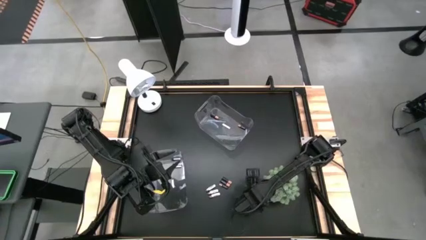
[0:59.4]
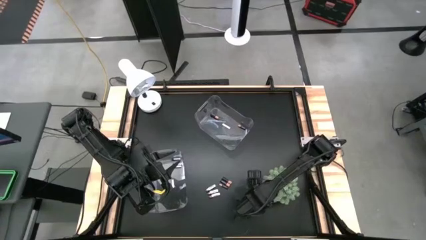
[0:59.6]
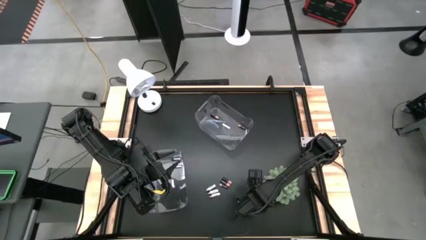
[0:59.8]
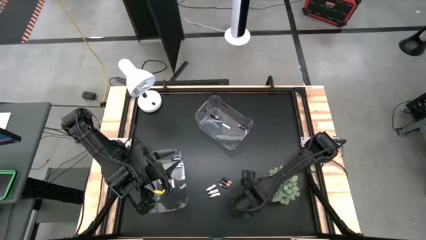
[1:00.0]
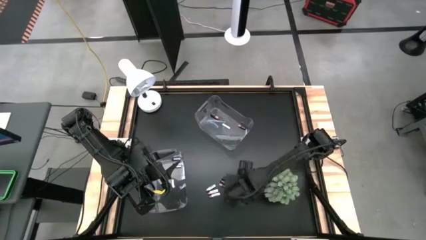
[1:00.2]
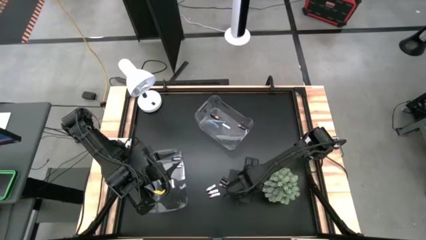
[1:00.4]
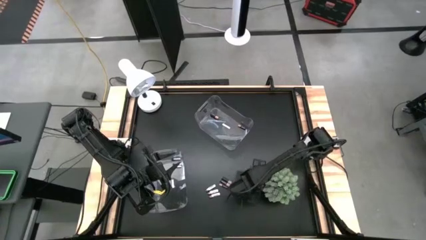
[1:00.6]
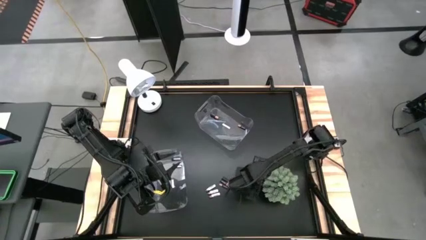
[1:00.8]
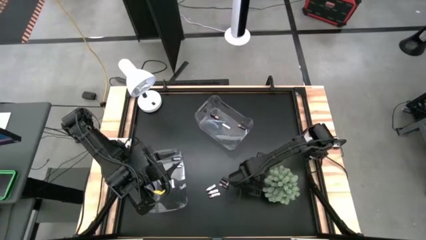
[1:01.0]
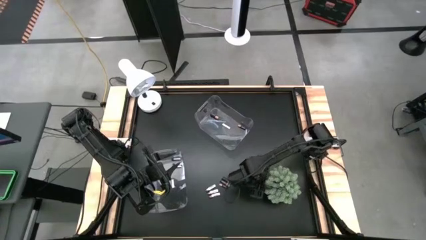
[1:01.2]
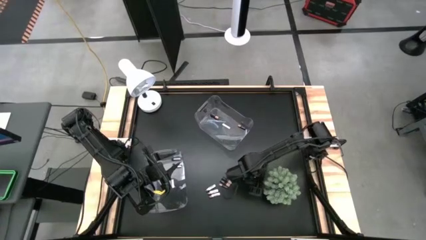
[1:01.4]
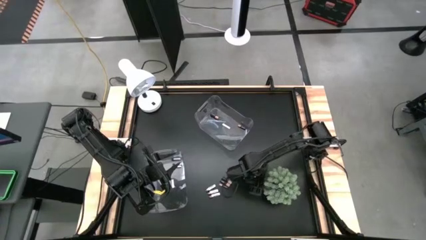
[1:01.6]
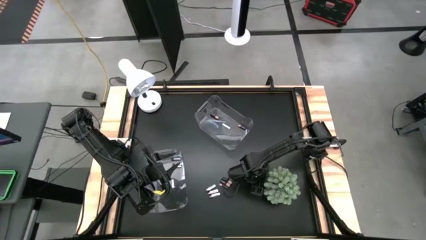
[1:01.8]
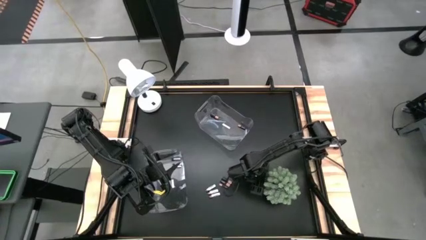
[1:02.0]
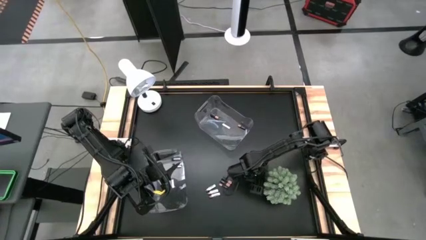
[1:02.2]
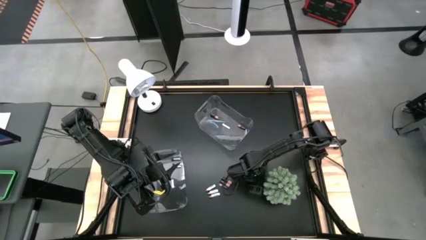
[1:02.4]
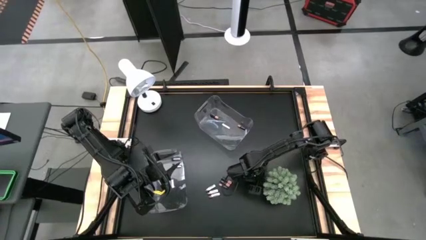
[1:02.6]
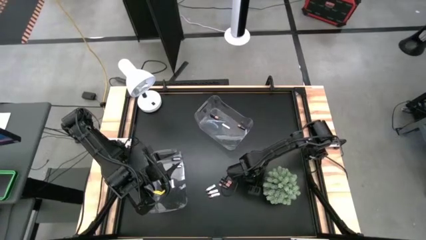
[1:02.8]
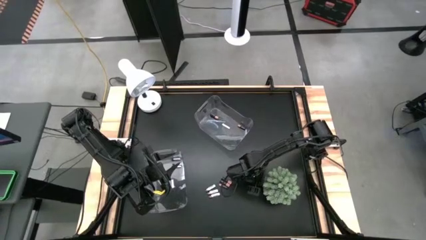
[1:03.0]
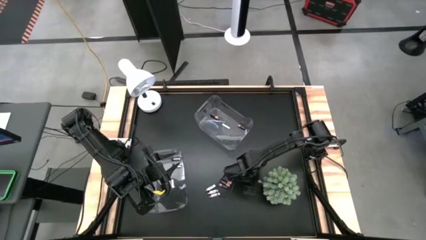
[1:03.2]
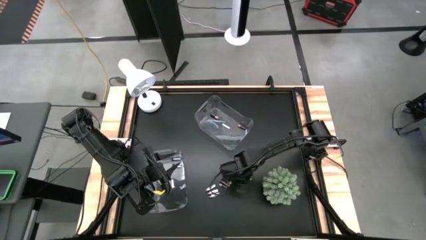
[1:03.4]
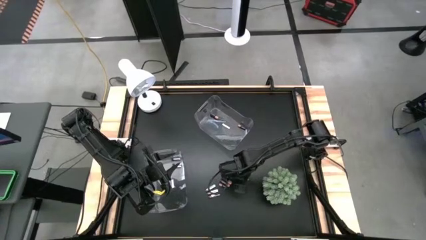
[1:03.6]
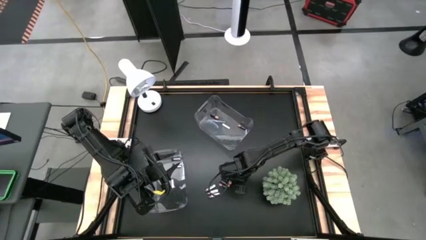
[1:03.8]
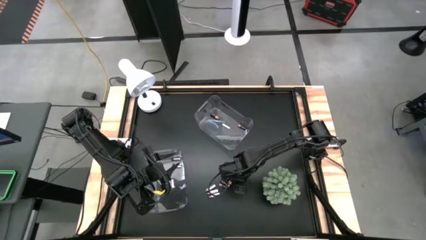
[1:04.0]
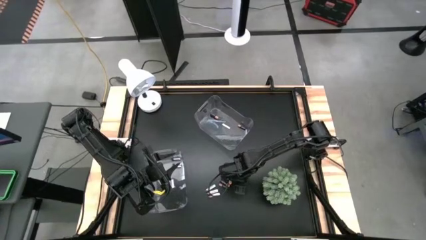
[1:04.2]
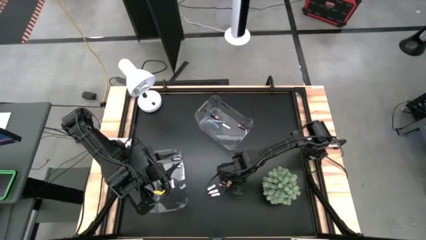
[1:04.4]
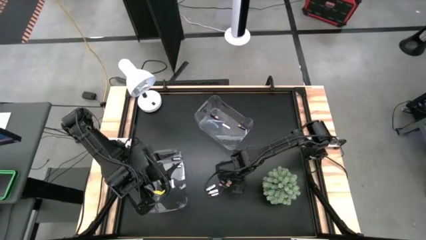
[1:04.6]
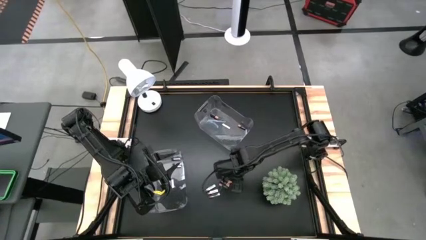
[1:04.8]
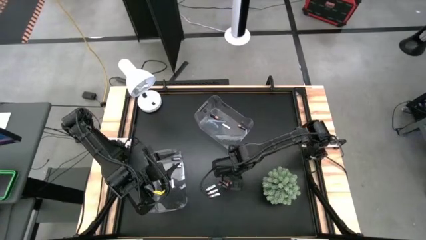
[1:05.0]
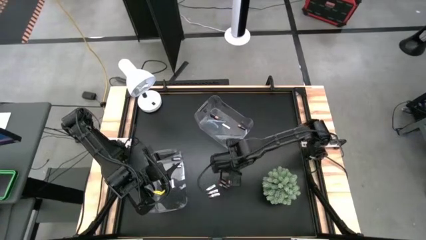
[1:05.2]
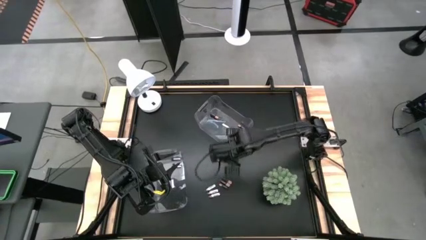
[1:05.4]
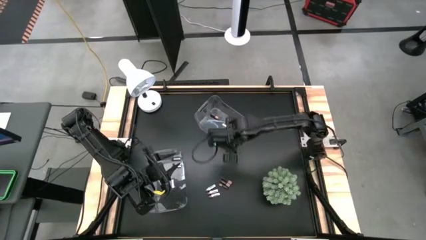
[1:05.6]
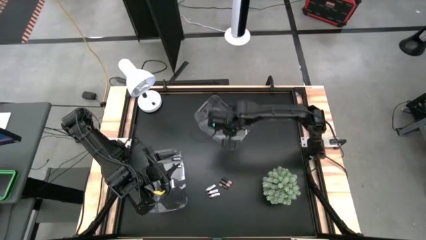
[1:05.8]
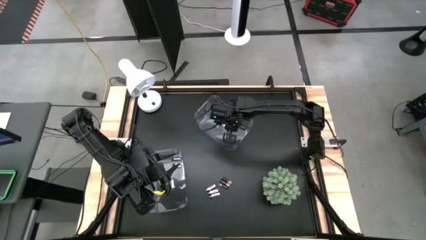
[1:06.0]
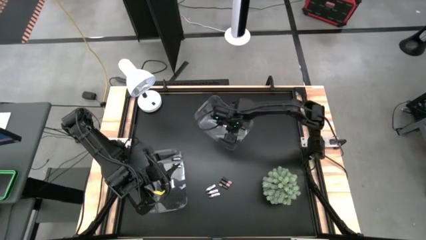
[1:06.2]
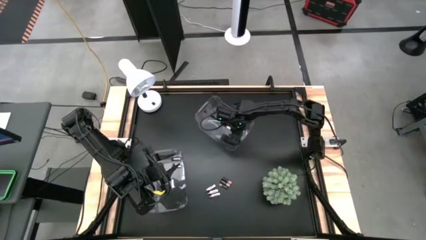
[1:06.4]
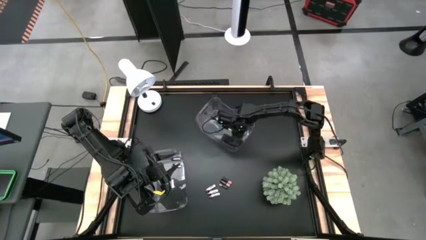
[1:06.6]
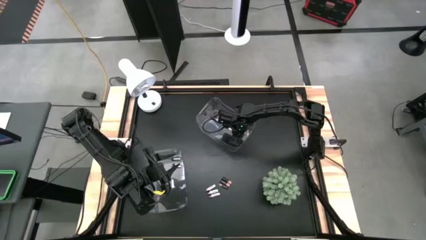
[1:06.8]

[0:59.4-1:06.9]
Task: Sort batteries
Put the black battery into the top transparent bin

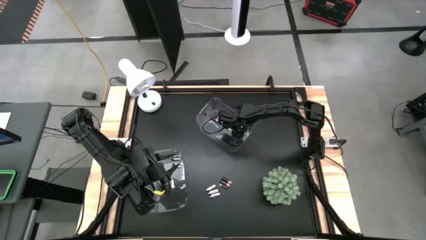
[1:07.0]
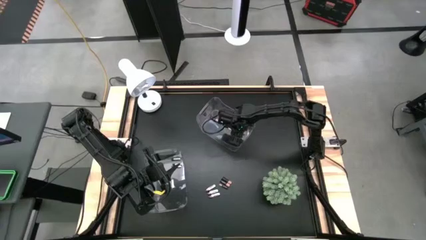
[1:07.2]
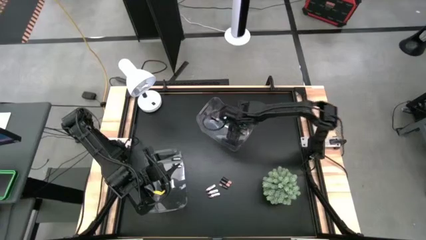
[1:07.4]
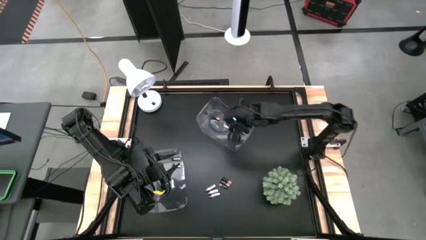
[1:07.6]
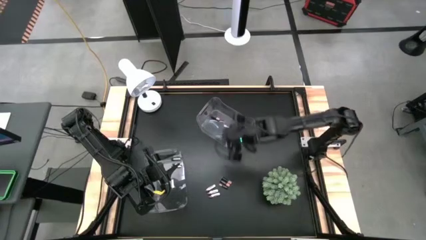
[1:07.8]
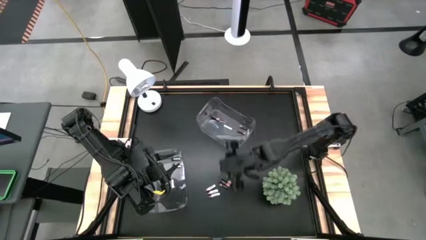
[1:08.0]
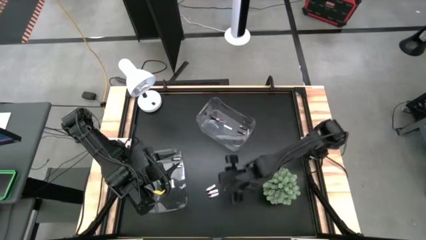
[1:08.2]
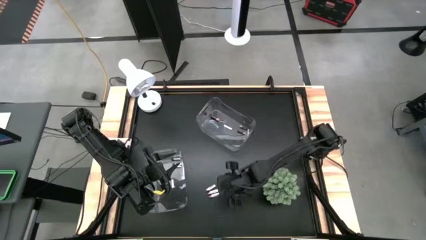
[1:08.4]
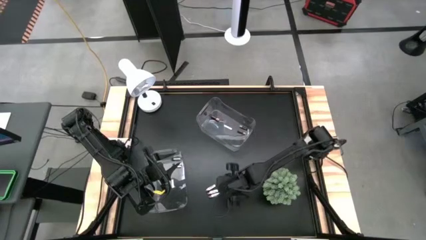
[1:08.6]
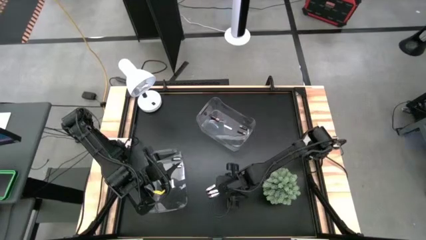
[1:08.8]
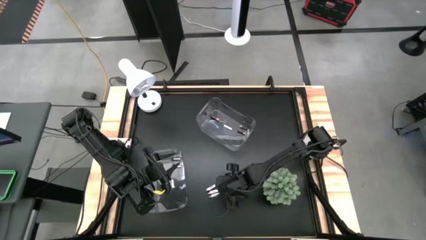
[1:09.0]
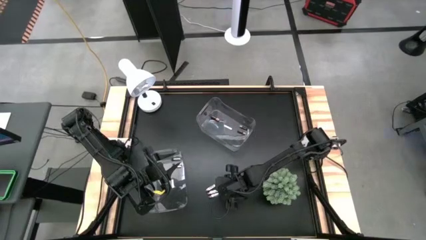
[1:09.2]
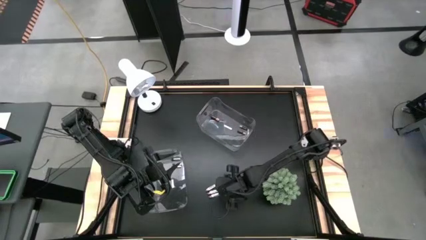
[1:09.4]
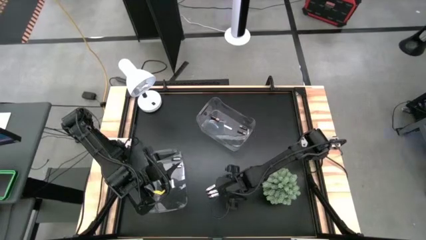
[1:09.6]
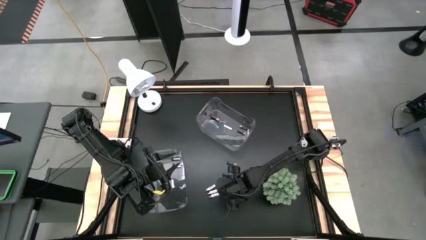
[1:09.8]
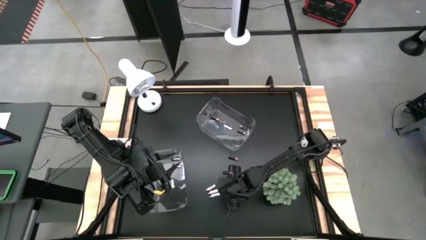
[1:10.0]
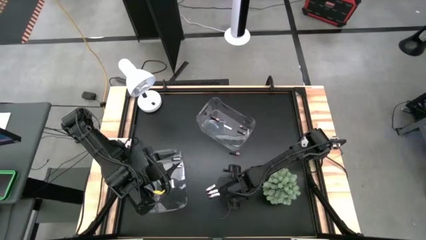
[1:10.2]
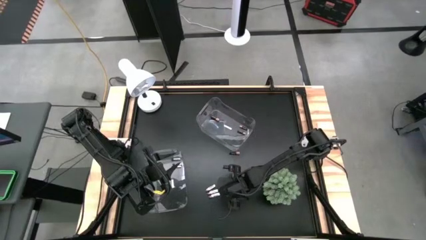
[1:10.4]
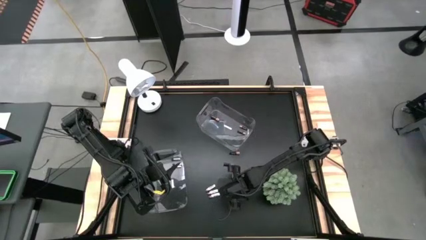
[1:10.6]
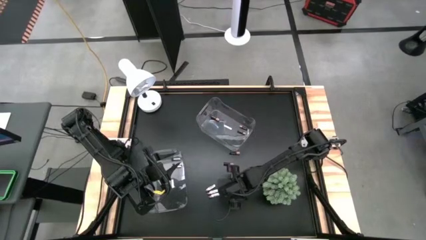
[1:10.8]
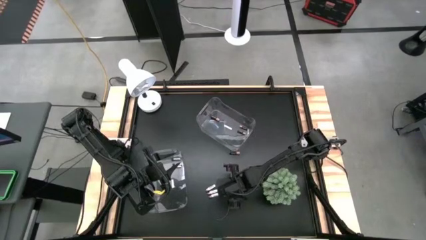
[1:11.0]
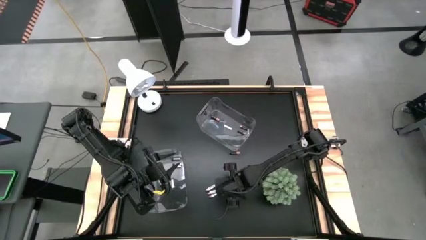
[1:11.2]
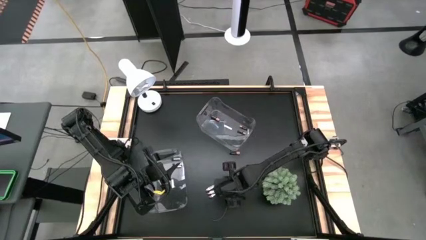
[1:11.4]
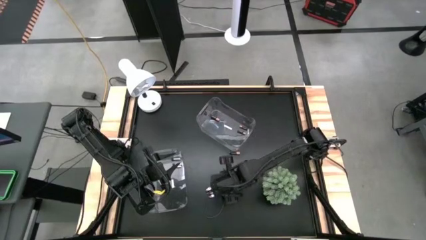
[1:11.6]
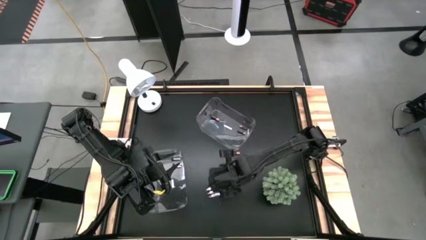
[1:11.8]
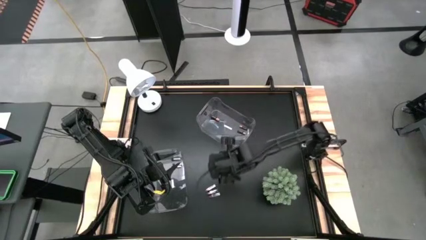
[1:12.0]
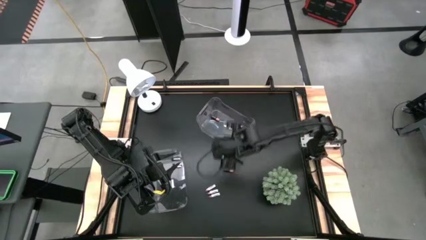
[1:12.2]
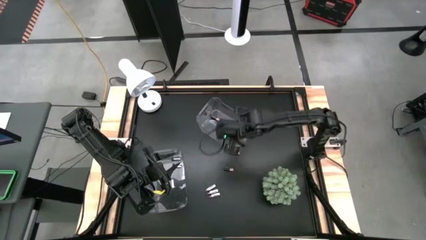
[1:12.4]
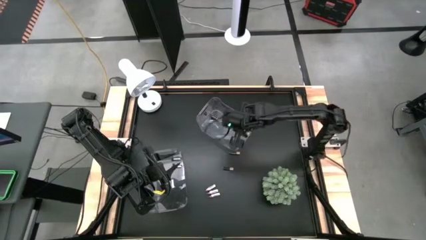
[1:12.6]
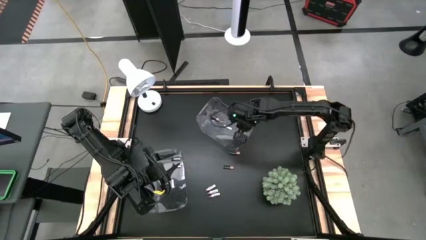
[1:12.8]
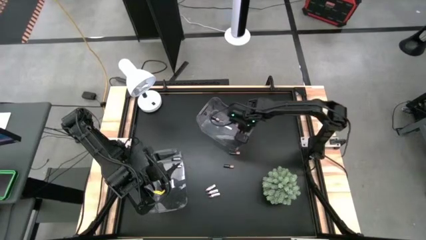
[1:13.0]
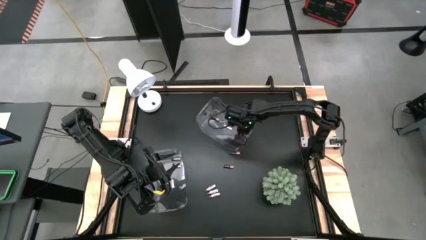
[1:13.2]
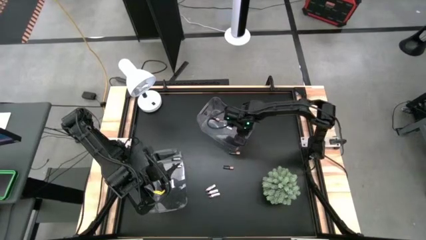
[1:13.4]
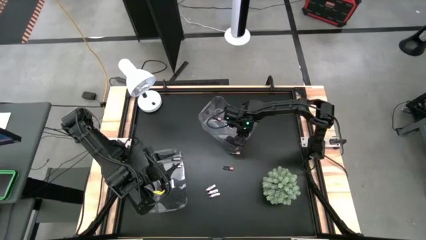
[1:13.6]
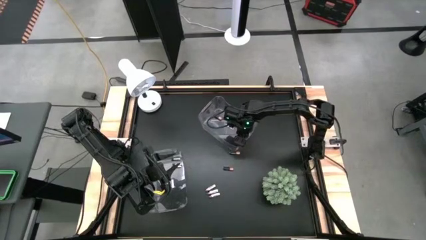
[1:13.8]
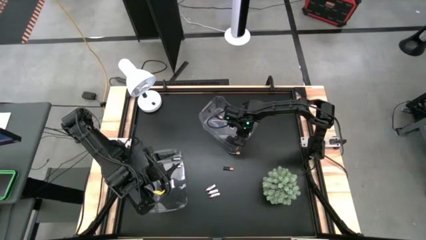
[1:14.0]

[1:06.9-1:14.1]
Put the black battery into the top transparent bin

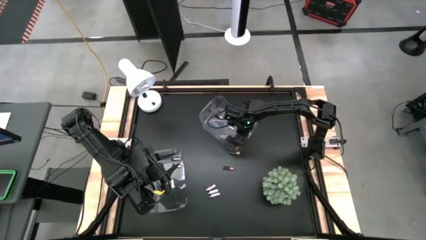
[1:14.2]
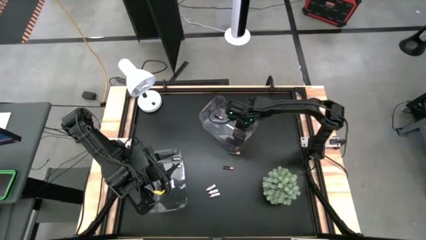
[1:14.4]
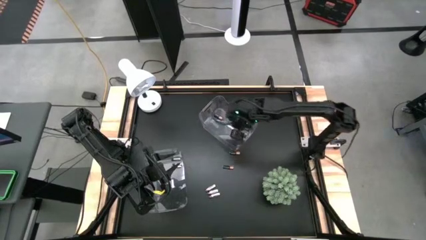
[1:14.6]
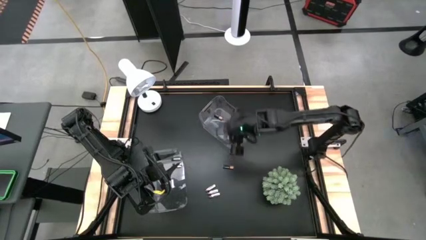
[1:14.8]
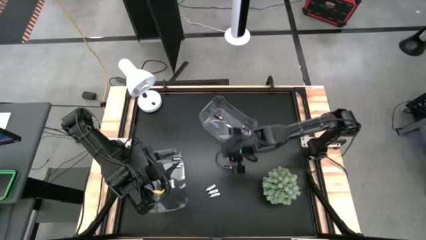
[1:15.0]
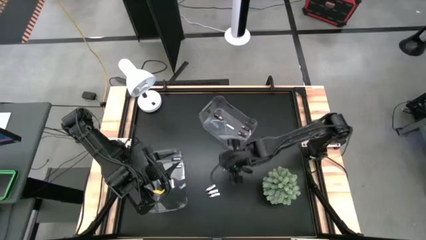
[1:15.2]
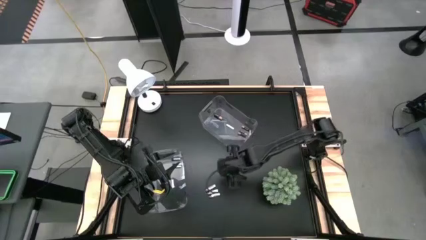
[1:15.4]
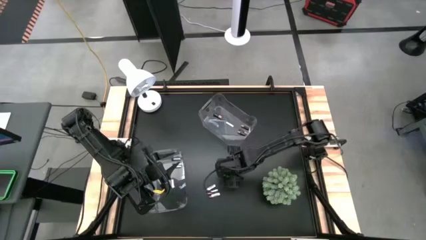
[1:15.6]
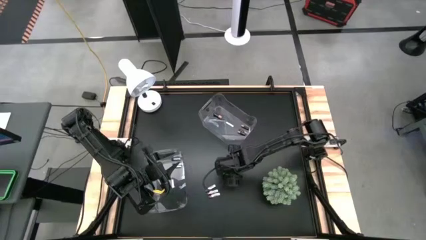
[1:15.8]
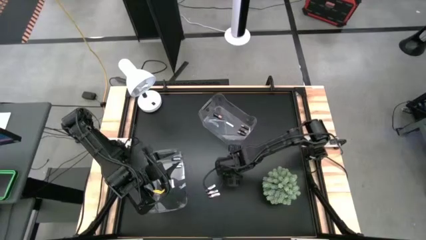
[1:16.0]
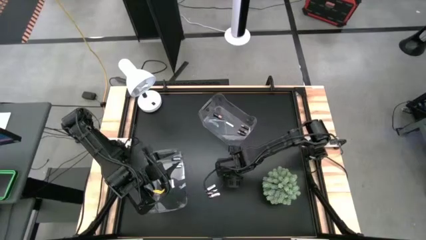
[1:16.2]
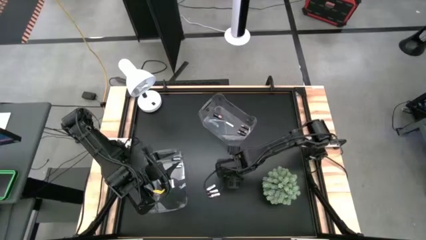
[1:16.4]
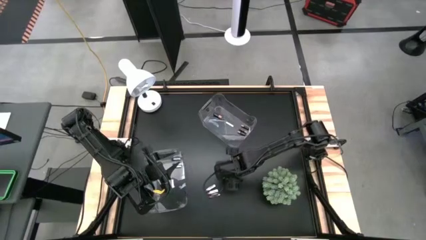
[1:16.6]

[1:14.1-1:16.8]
Put the black battery into the top transparent bin
